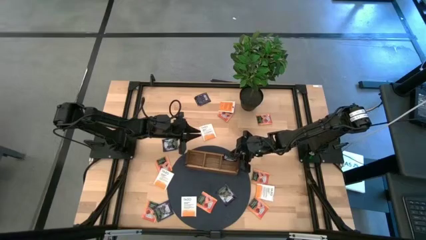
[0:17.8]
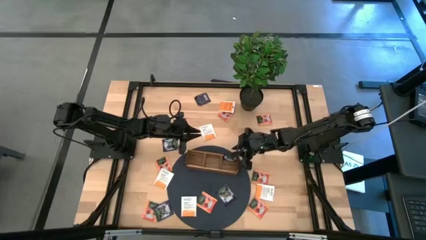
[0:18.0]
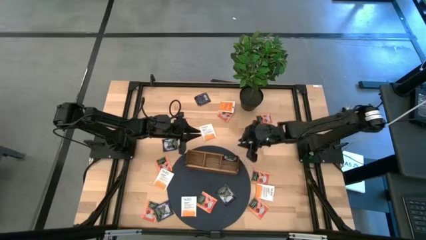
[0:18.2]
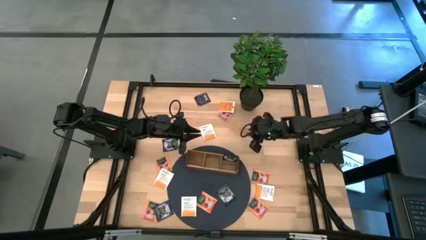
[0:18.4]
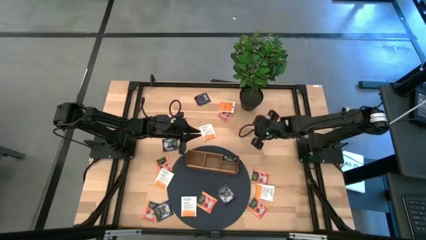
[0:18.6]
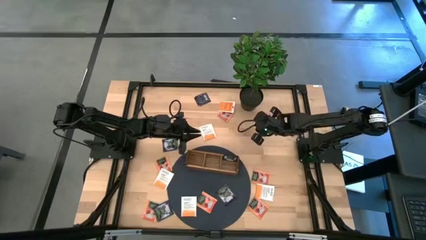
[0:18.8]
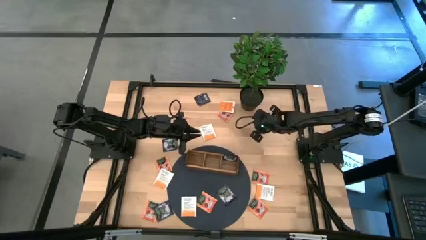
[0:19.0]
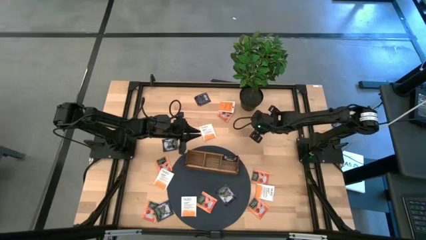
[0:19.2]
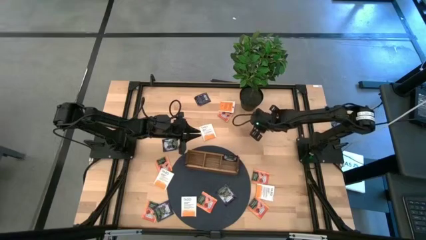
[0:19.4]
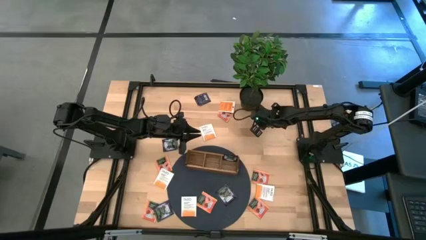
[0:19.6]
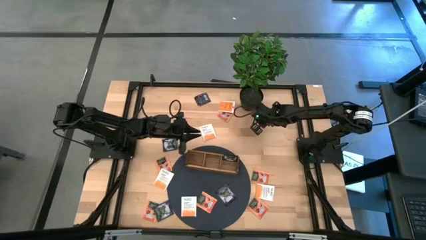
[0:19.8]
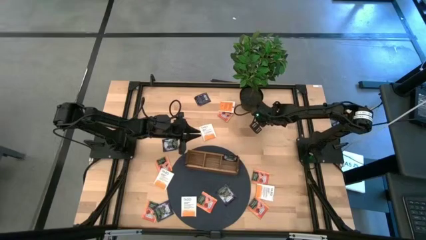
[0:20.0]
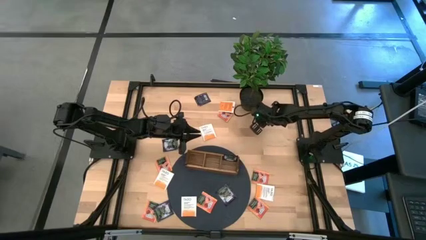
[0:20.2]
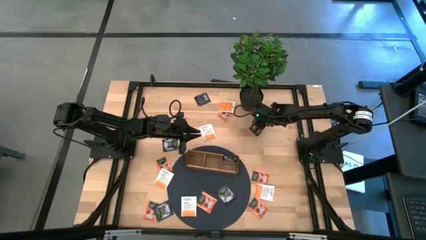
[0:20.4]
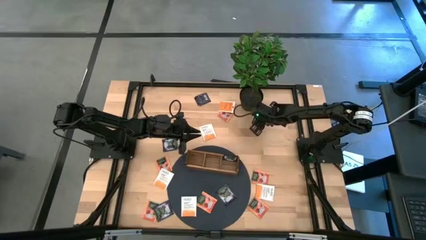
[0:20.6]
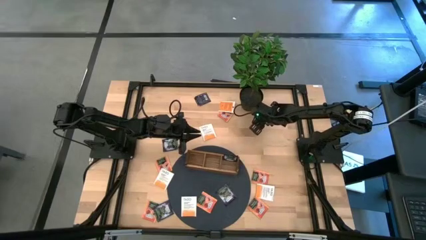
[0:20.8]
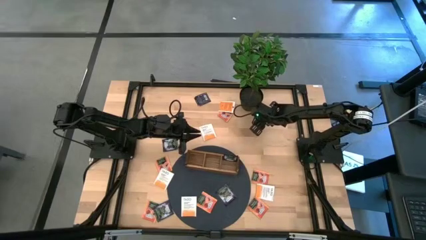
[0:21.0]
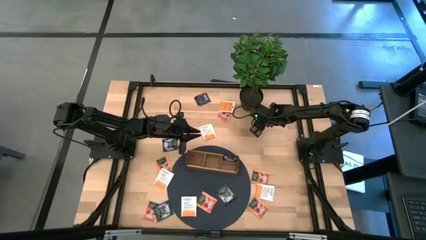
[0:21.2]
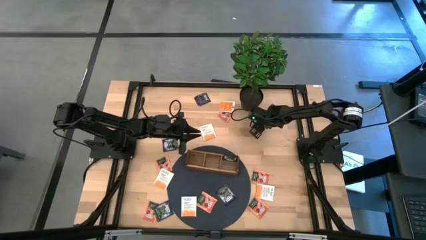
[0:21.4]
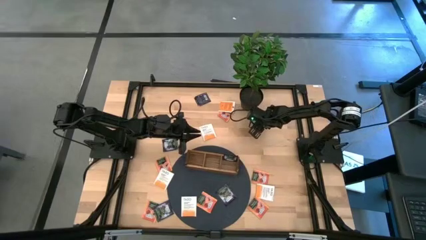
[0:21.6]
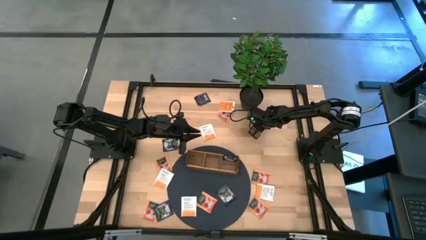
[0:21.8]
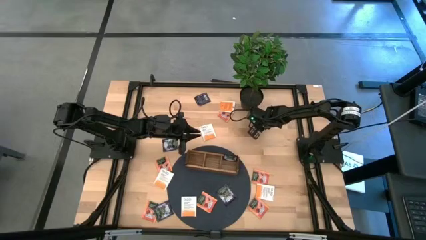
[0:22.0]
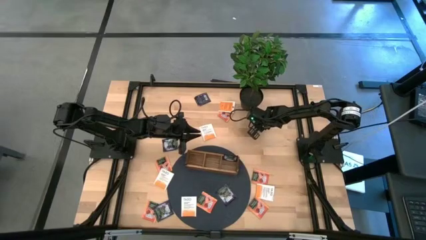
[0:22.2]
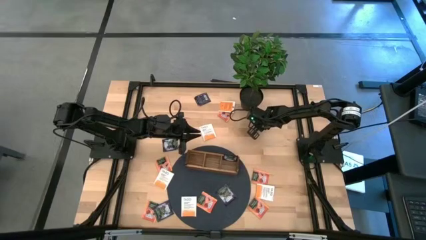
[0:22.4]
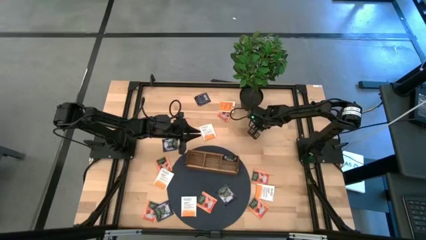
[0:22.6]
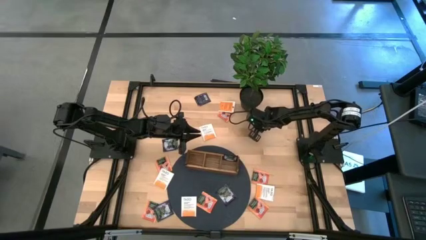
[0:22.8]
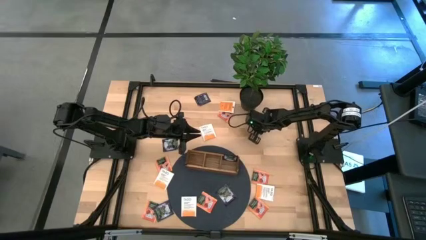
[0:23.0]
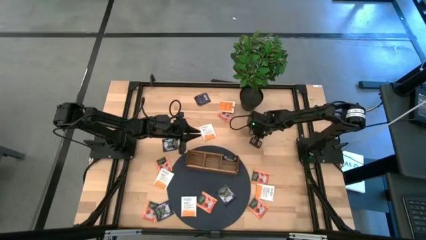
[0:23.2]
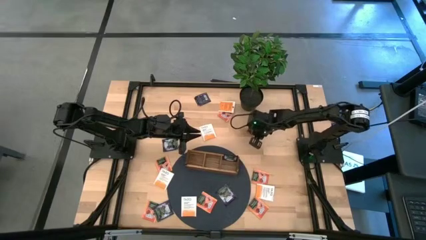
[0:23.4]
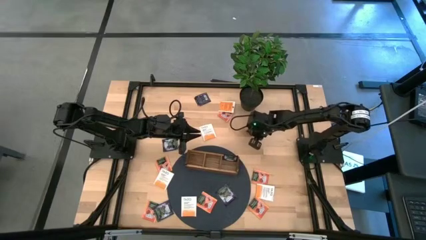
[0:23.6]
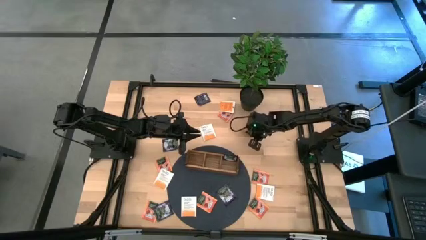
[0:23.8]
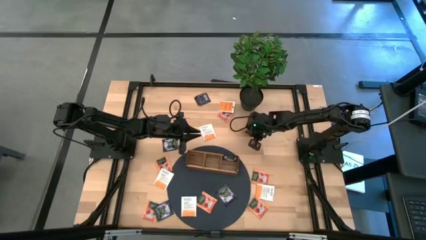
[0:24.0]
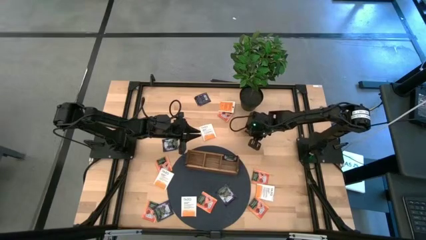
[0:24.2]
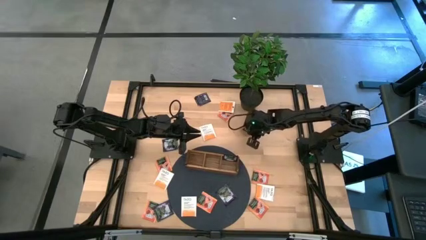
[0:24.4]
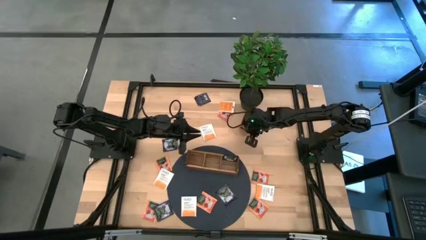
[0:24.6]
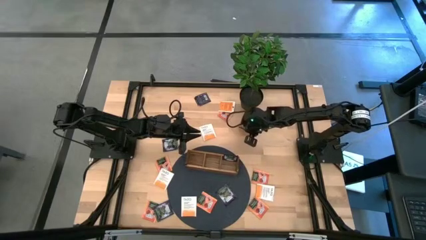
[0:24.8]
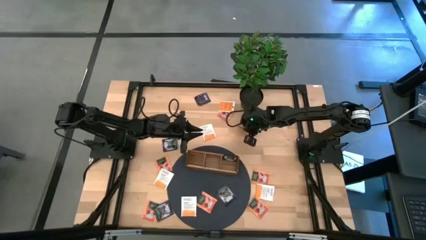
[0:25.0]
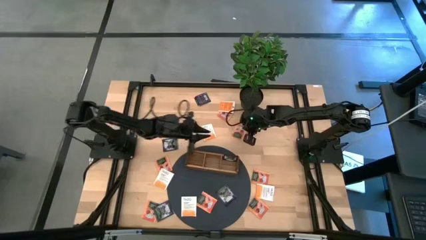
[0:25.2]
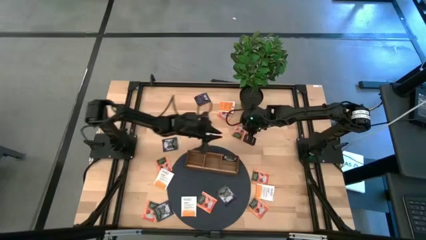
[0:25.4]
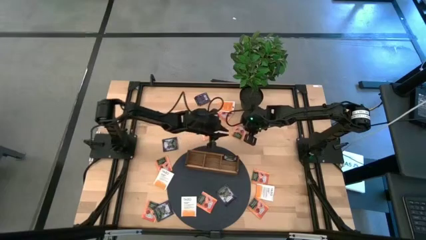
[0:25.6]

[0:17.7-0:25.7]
Task: Pick & Place Tea
Put the orange black tea bag into the middle section of the wooden organizer

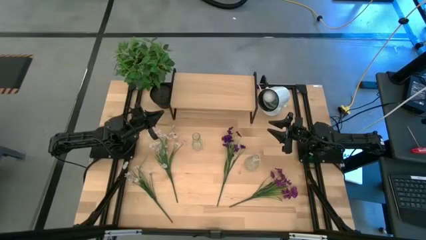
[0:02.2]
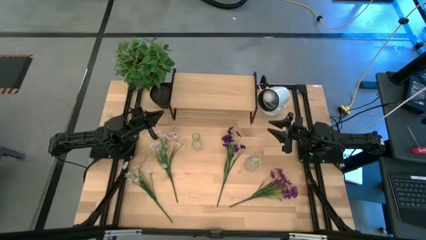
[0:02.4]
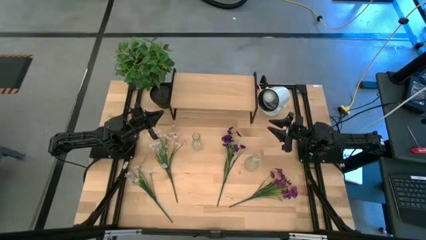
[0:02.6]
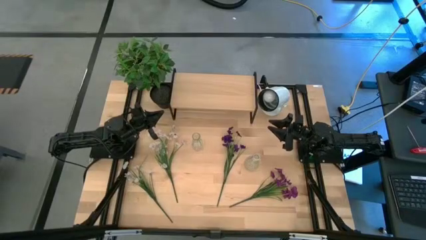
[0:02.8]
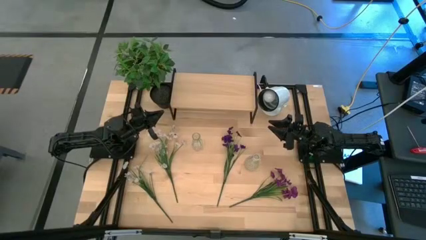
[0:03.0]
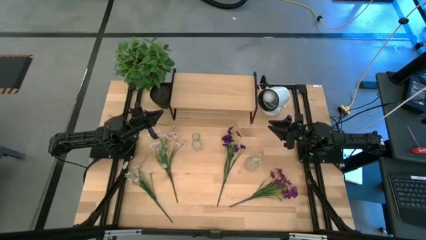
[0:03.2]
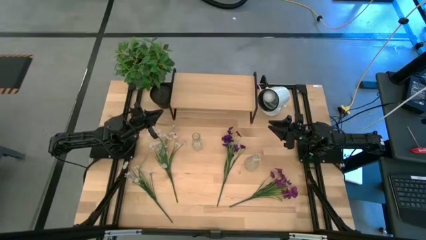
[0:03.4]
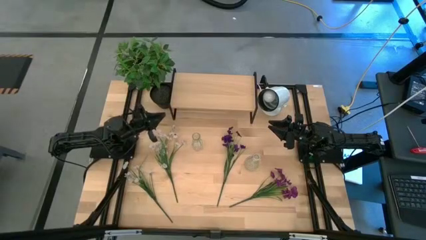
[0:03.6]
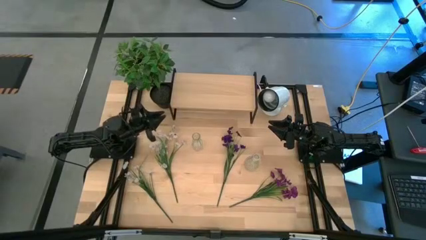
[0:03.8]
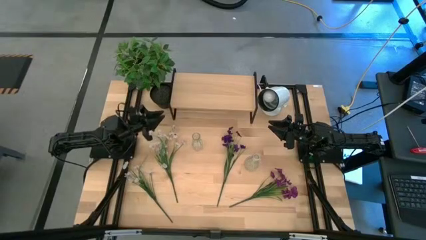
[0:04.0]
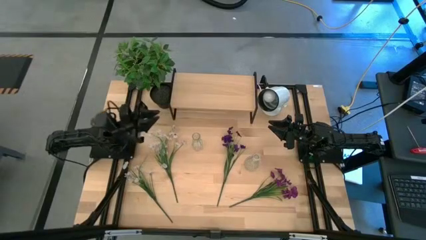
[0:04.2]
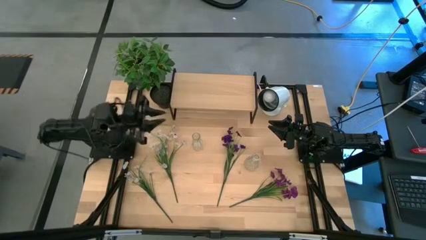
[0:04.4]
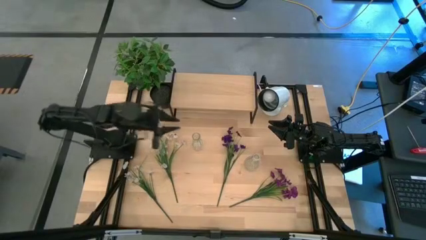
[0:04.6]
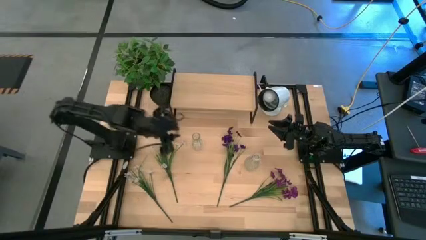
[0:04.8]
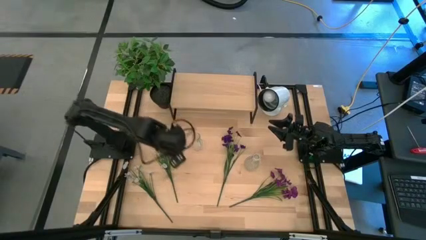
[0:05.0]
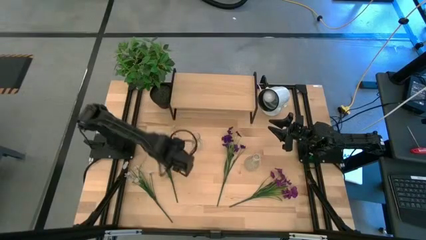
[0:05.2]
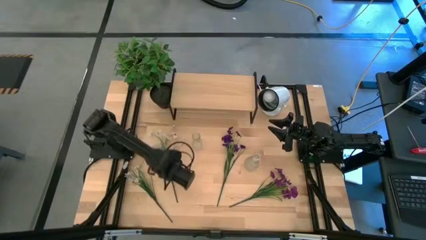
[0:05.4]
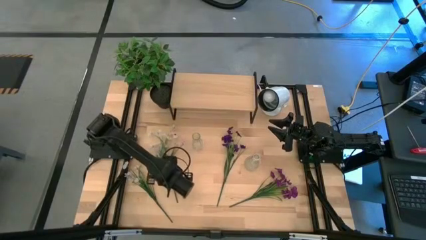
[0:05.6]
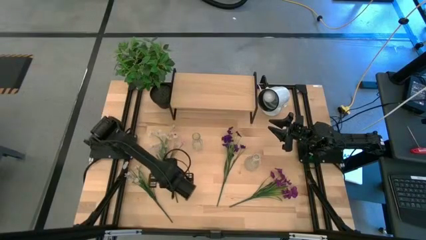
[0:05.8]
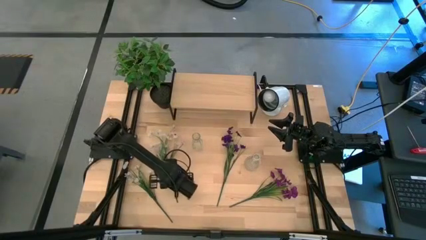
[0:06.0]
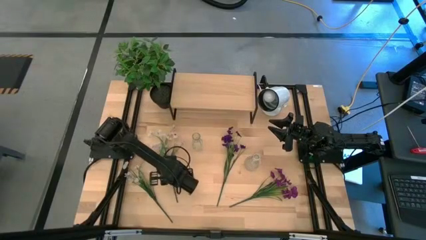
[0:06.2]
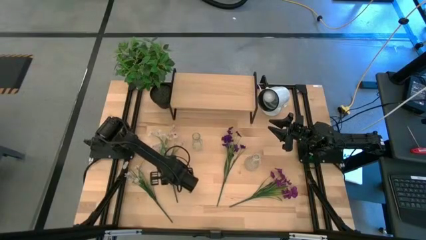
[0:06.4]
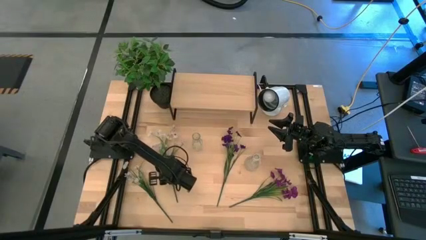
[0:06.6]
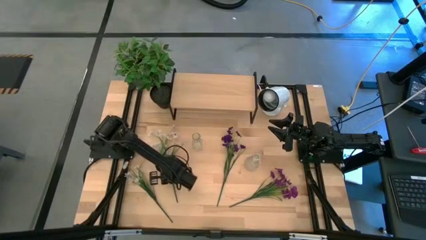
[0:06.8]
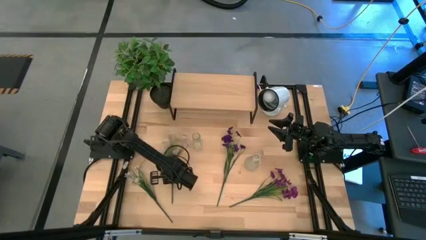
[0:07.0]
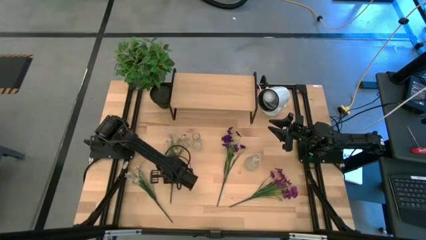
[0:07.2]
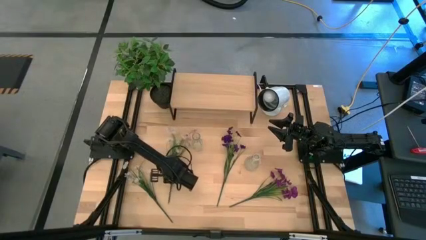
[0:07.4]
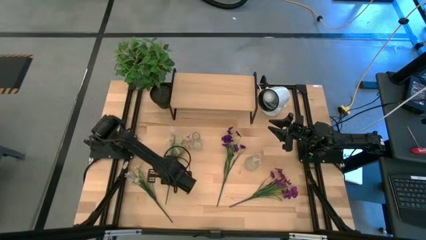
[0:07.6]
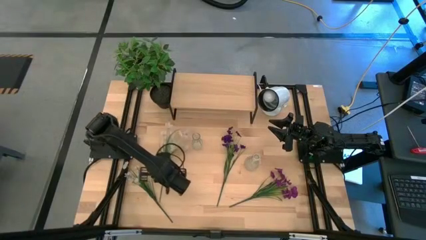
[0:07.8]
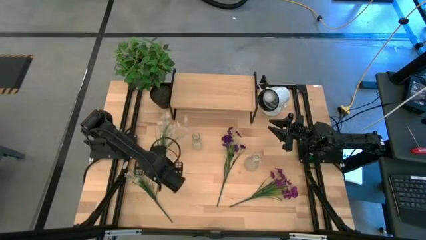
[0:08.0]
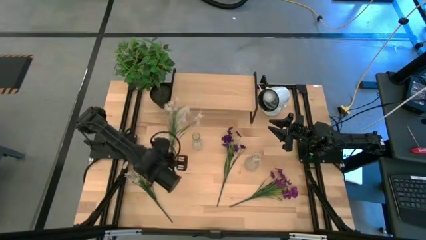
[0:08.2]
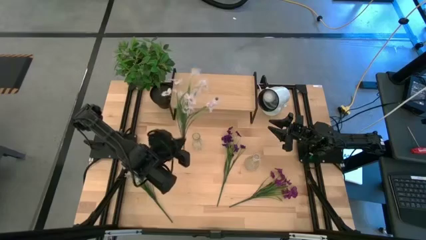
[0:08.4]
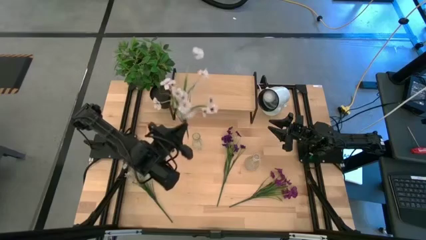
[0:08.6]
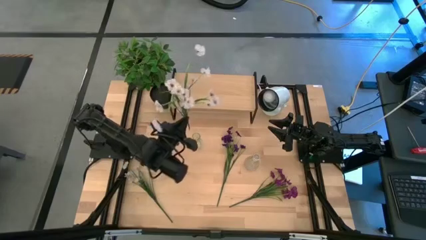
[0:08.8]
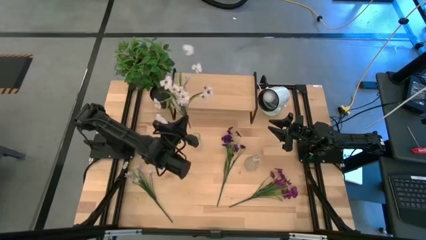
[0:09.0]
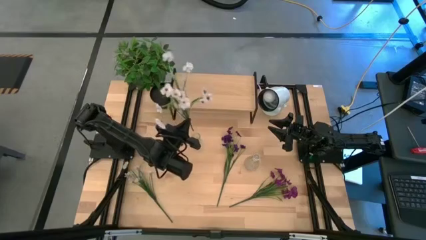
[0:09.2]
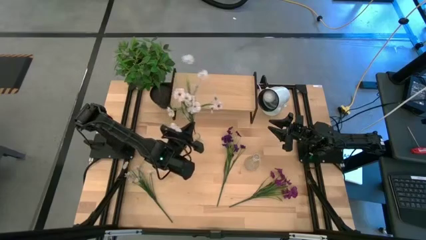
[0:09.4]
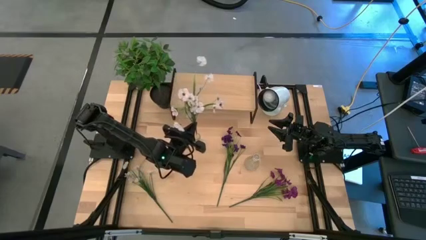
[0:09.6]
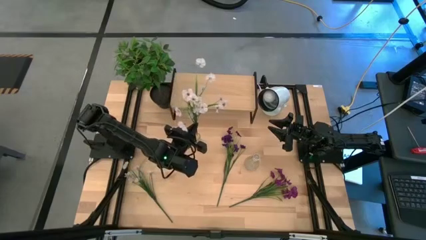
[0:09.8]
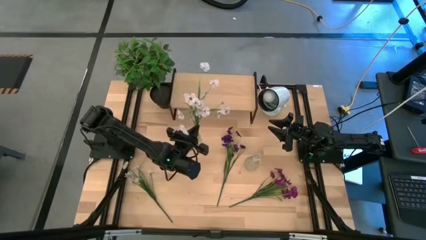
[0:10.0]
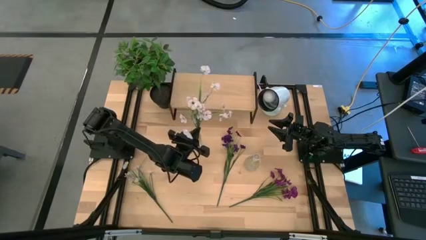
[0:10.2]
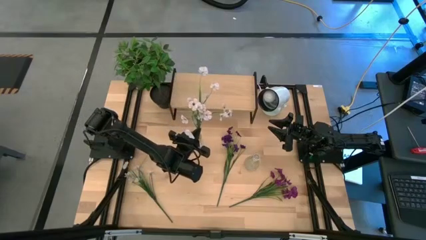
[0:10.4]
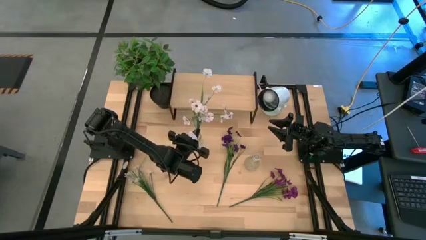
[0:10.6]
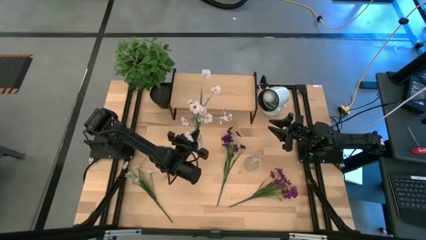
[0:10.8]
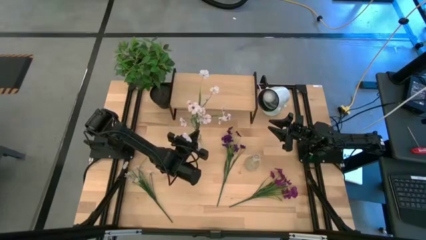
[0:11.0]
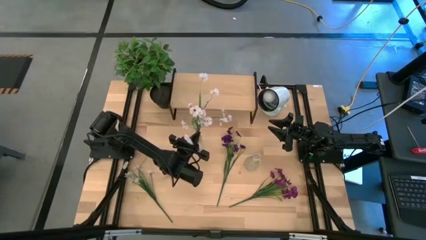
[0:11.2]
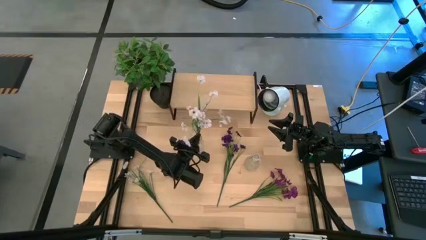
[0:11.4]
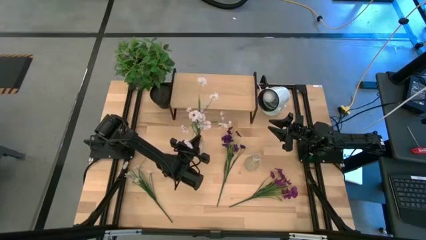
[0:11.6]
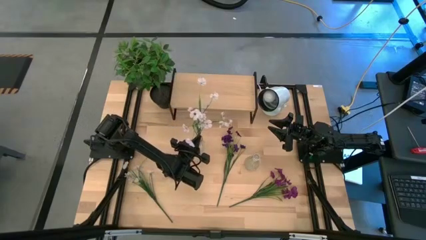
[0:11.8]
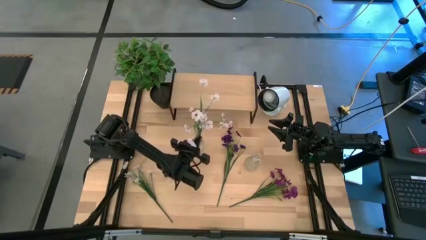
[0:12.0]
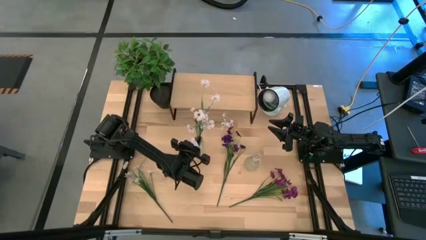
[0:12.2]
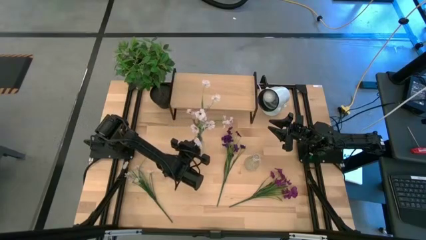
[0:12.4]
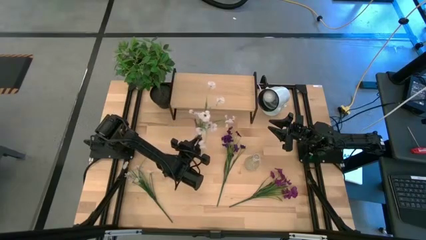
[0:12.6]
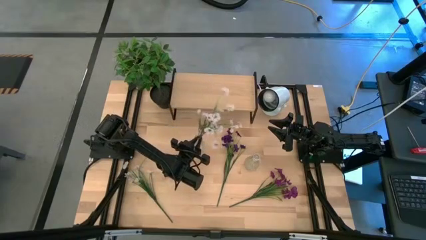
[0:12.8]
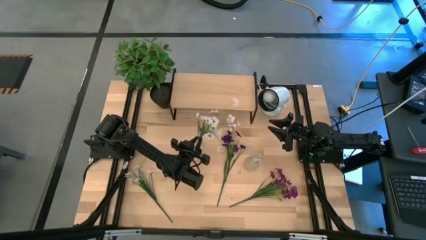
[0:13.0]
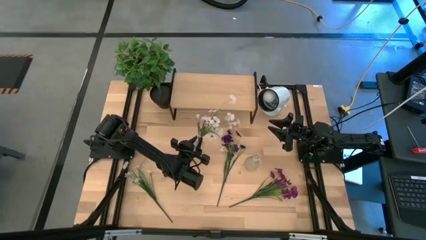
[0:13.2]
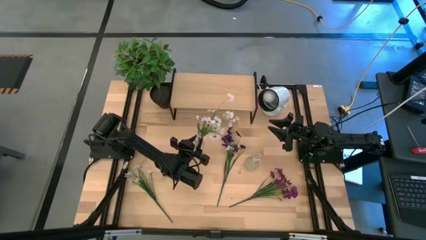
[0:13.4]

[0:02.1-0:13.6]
Task: Pick and place flowers into a vace then onto a shelf
Put the right white flowers into the left transparent vase
